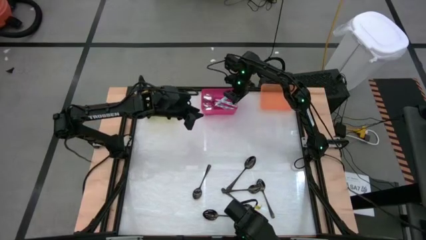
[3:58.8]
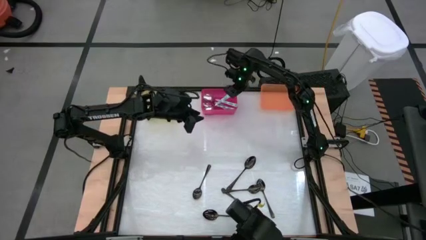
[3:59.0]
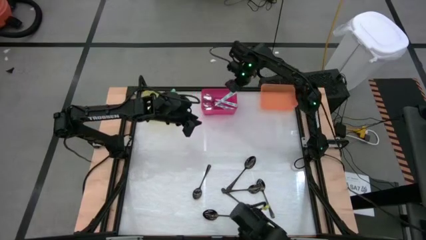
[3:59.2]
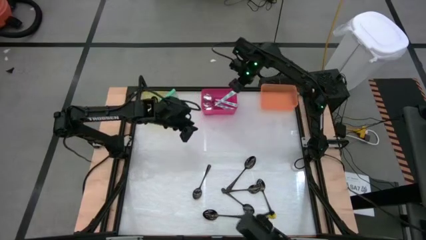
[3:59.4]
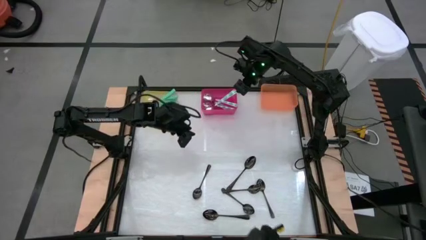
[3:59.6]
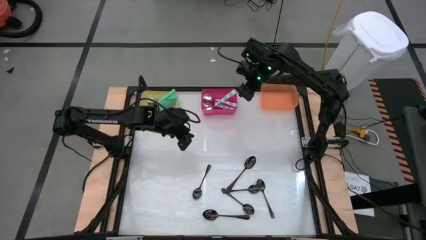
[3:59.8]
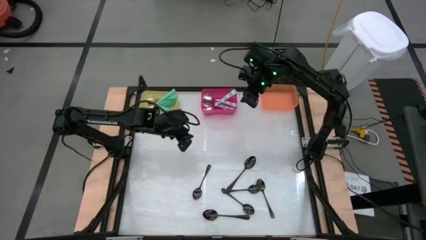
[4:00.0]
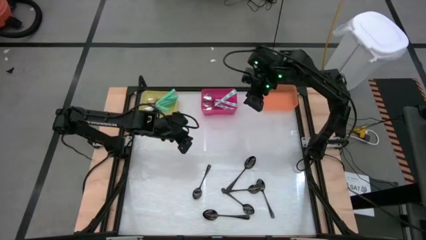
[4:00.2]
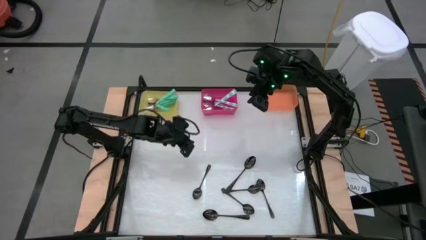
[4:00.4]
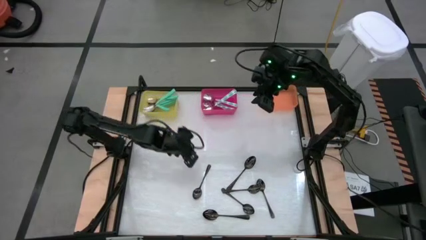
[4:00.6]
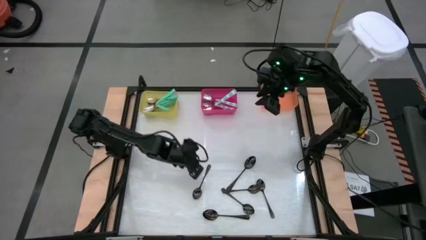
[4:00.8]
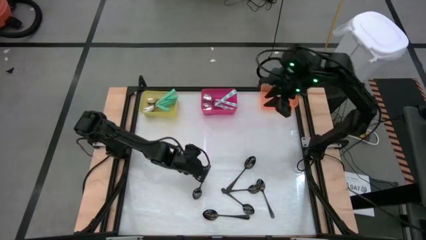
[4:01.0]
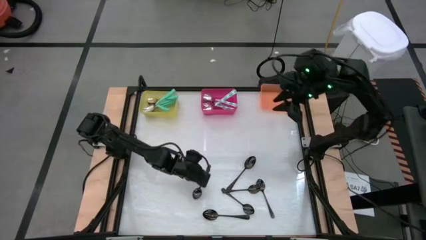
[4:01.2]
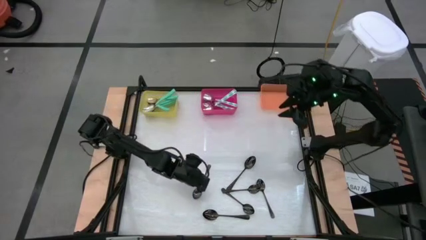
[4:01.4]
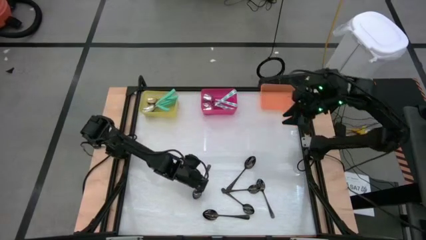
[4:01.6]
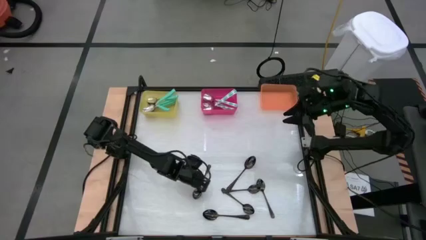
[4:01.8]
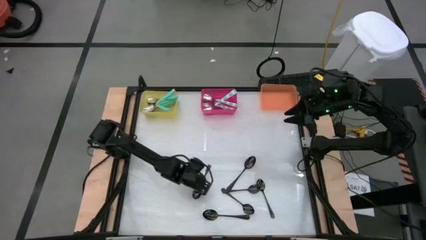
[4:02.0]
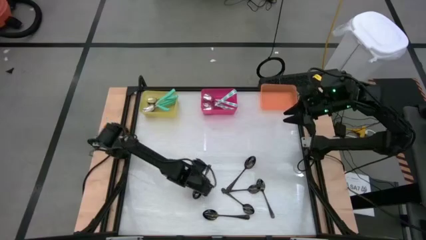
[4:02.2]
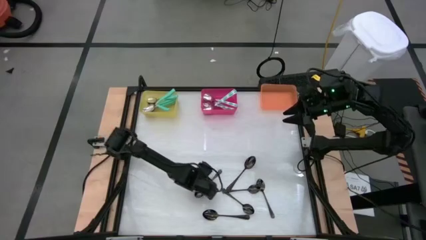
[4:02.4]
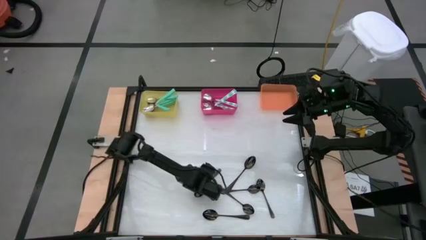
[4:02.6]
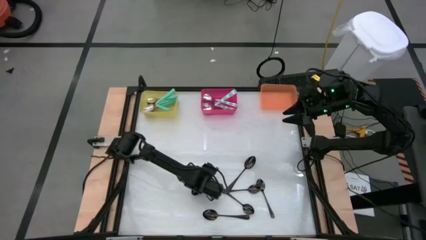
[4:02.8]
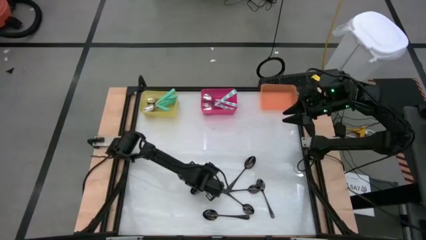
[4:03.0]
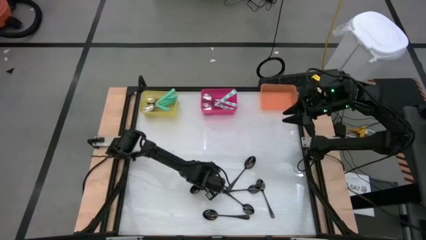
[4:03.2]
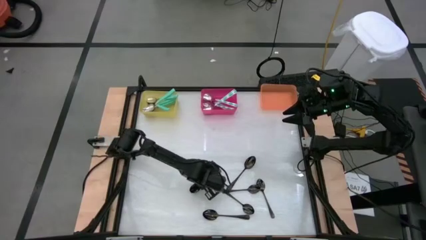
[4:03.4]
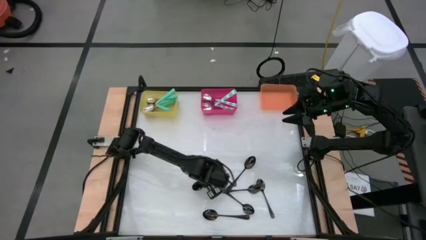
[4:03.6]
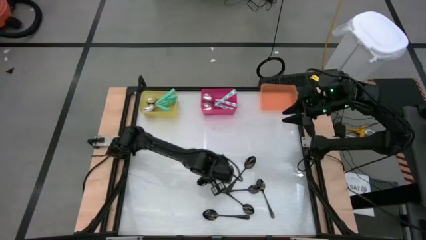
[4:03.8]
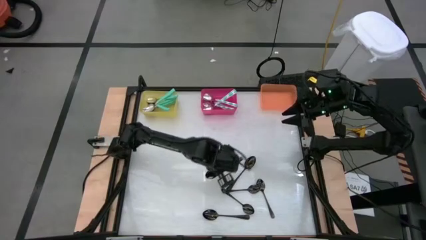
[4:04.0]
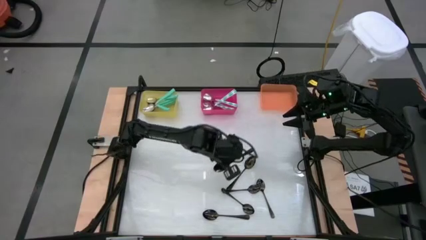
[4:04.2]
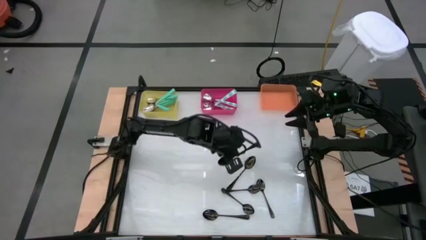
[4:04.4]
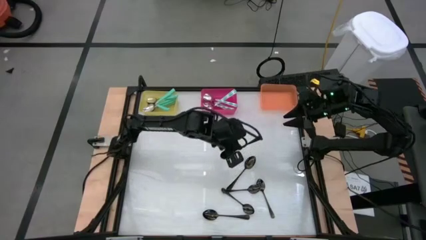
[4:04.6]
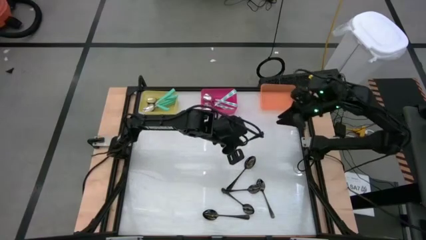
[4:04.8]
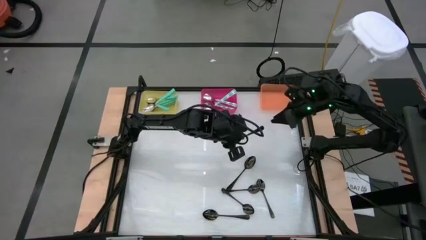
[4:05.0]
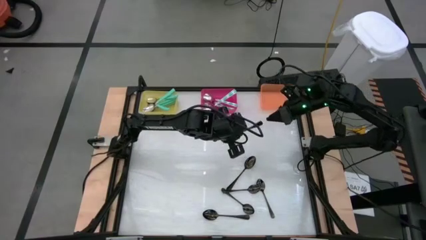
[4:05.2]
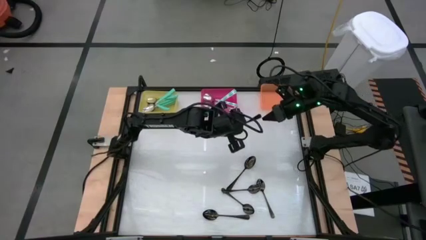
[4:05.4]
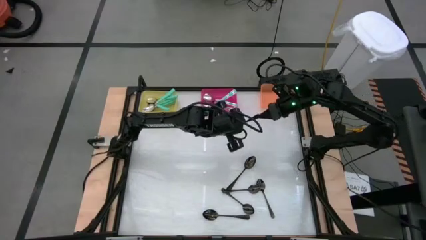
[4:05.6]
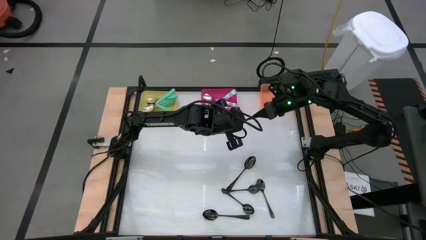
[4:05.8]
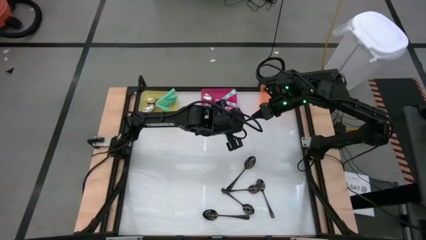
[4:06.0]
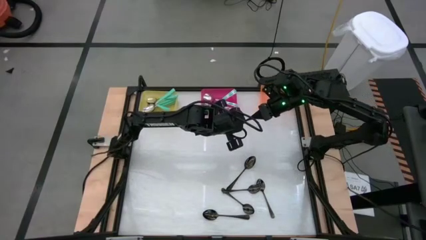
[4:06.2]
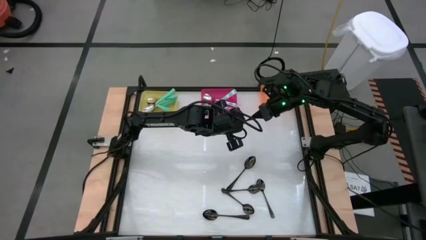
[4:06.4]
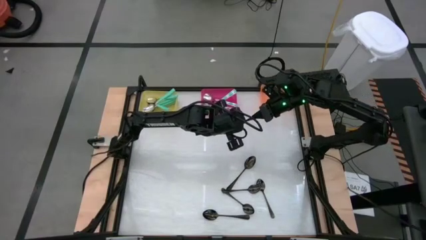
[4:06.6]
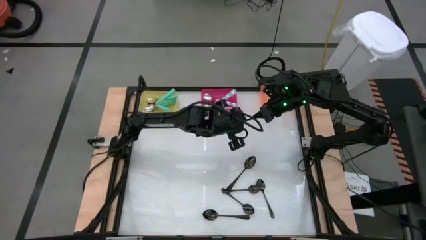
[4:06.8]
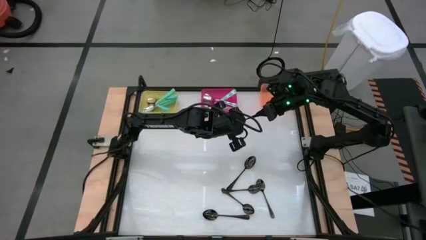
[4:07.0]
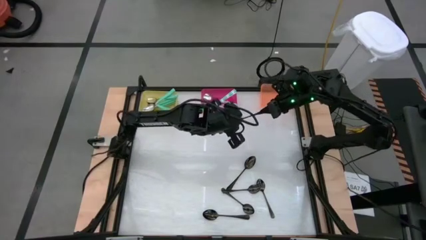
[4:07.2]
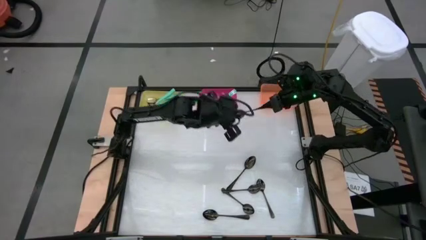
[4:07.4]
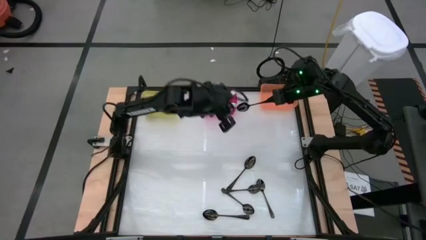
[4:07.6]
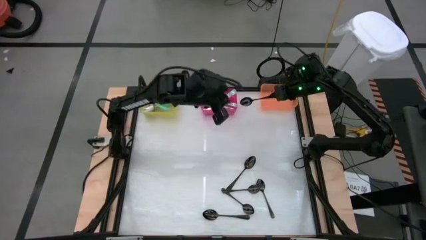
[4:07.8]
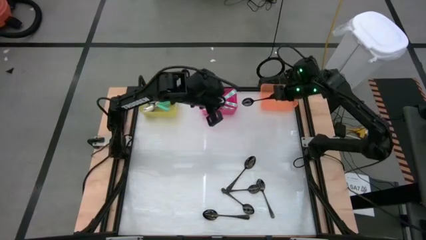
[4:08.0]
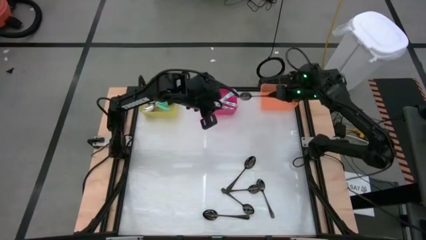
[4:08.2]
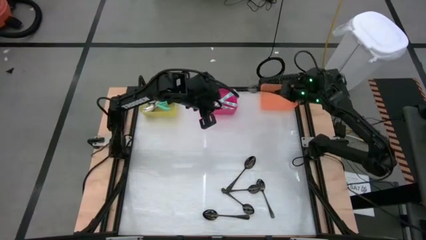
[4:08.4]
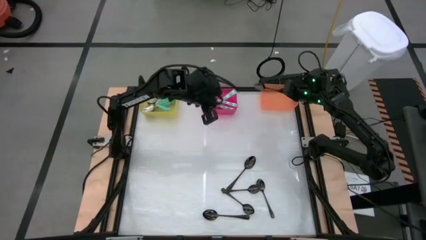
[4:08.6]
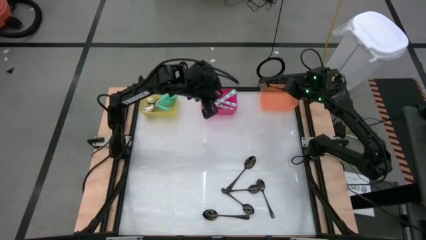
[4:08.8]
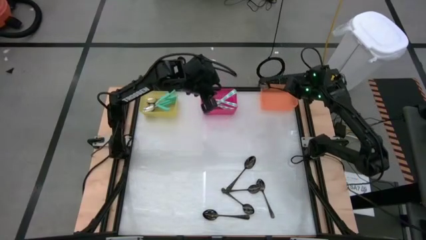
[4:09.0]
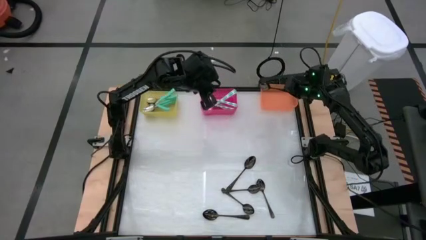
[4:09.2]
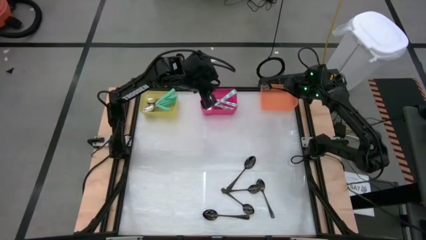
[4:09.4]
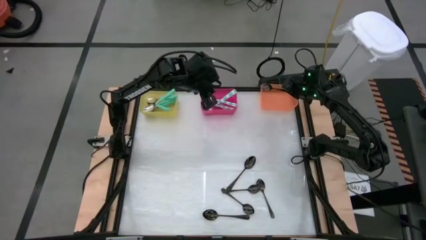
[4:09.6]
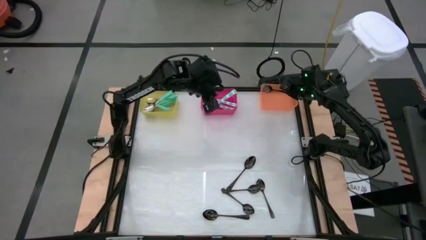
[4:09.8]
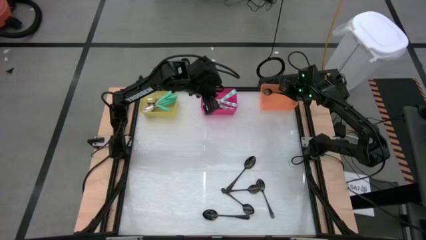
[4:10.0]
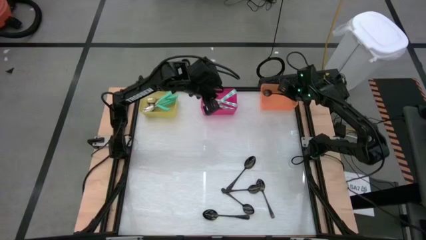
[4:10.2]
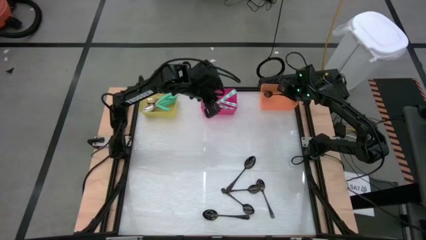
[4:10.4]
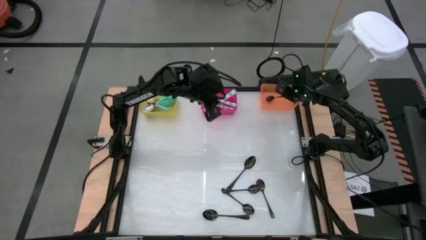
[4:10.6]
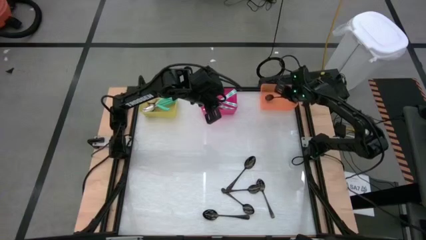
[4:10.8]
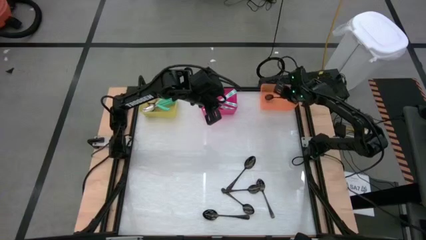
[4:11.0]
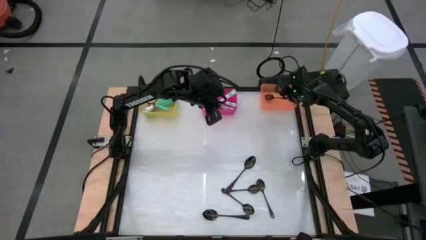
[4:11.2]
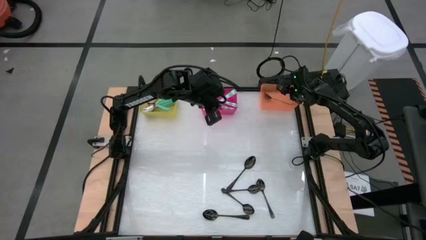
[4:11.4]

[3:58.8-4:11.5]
Task: Sort silverware by color (type)
Put the black spoon into the orange bin
